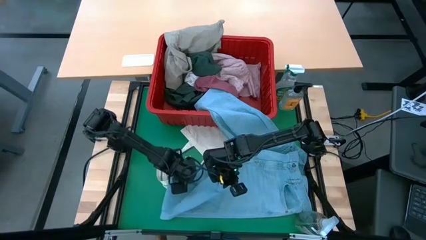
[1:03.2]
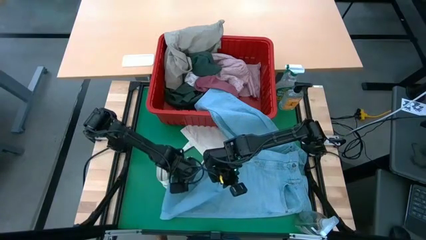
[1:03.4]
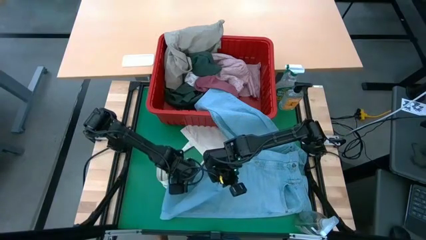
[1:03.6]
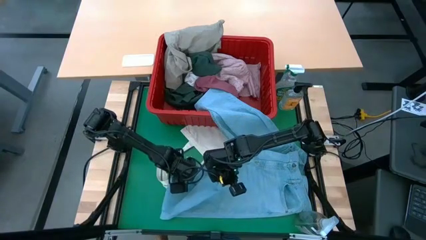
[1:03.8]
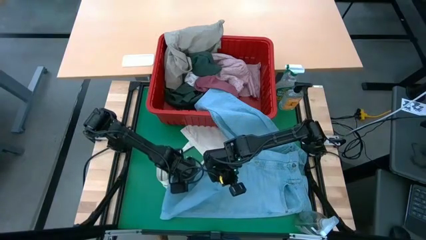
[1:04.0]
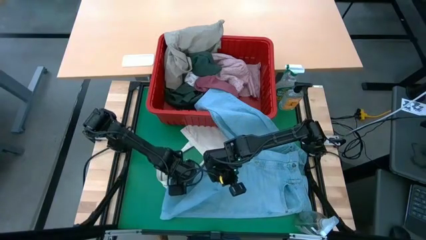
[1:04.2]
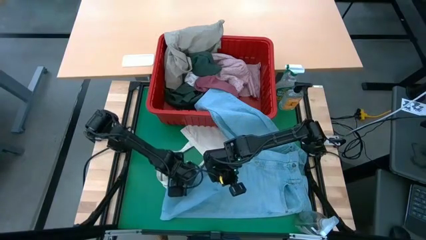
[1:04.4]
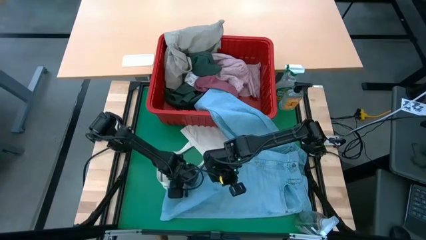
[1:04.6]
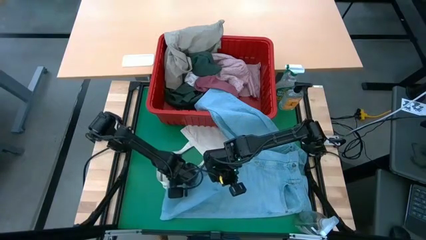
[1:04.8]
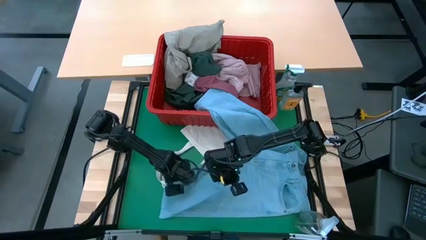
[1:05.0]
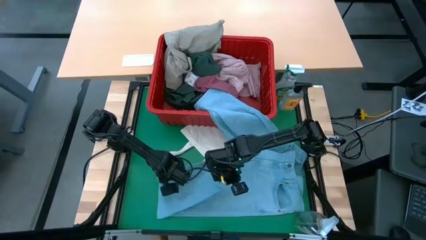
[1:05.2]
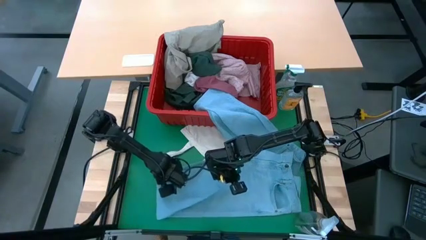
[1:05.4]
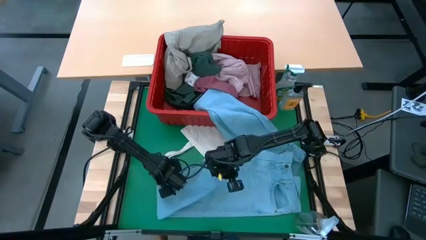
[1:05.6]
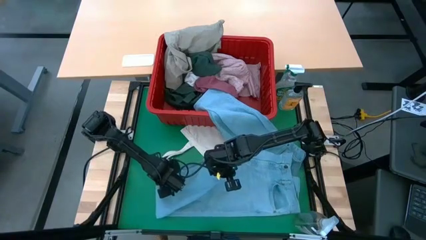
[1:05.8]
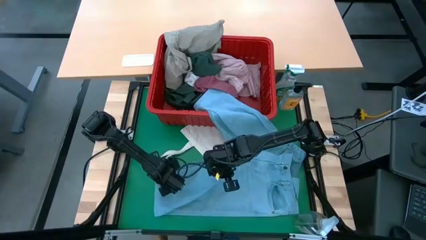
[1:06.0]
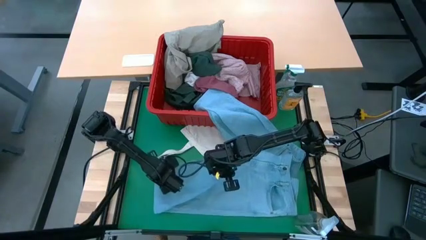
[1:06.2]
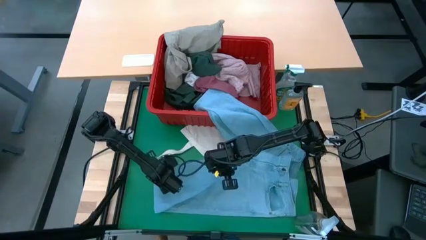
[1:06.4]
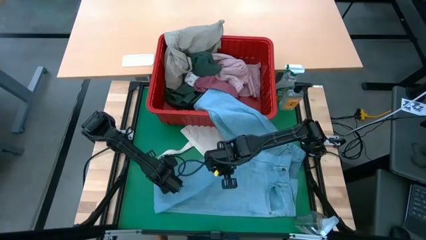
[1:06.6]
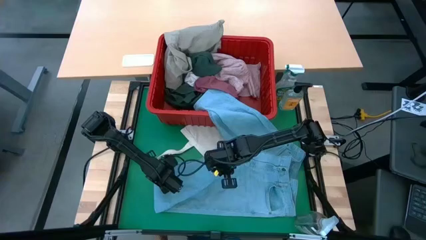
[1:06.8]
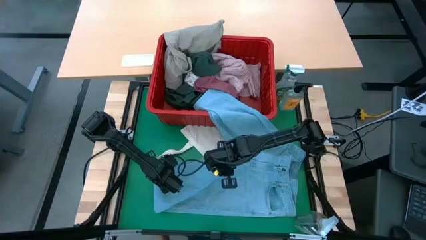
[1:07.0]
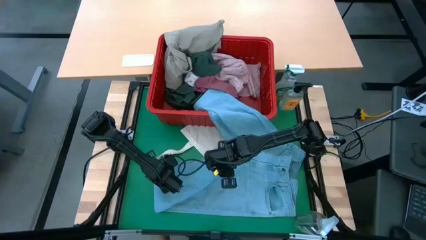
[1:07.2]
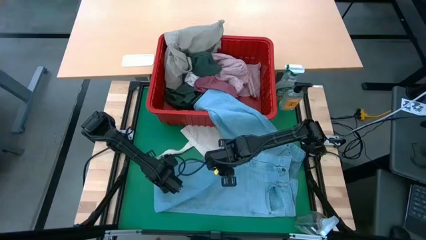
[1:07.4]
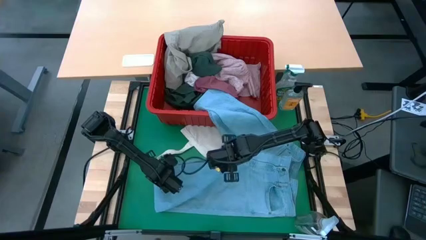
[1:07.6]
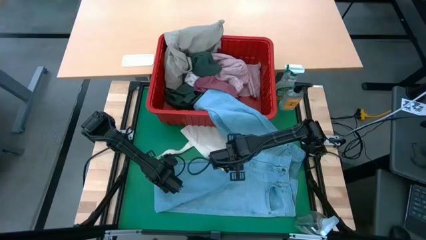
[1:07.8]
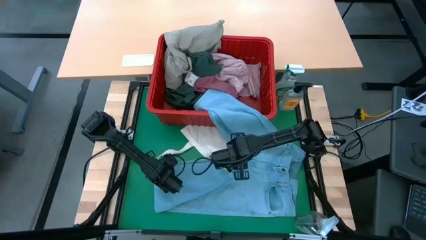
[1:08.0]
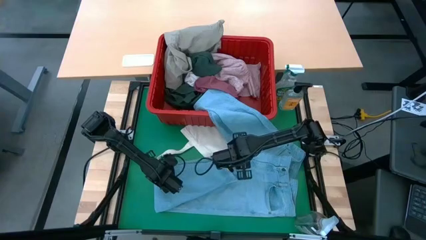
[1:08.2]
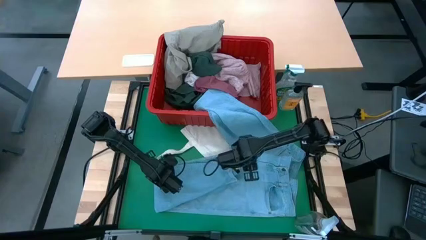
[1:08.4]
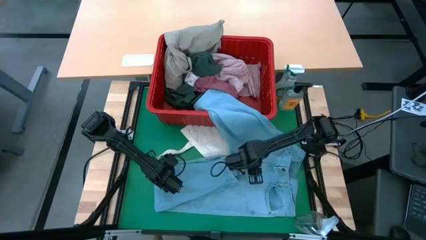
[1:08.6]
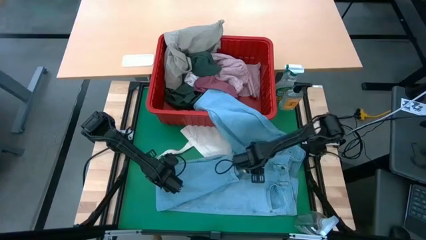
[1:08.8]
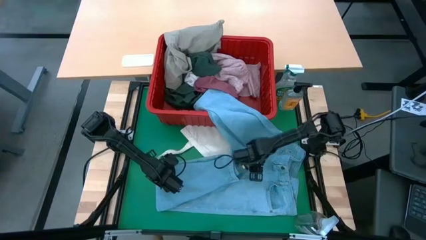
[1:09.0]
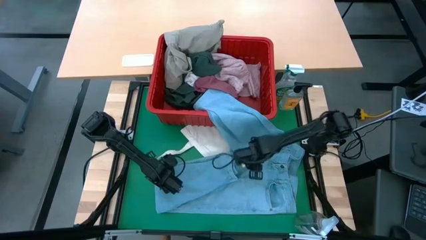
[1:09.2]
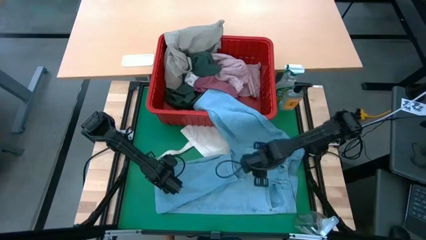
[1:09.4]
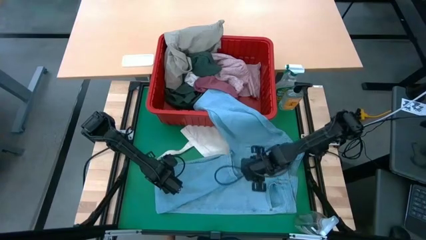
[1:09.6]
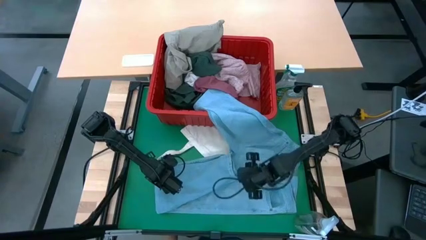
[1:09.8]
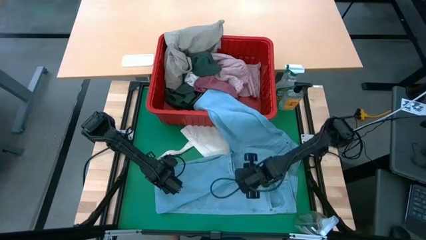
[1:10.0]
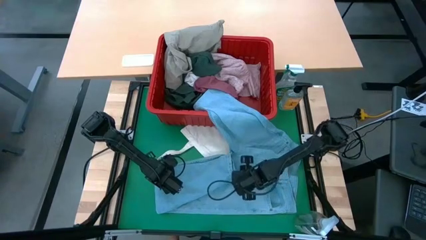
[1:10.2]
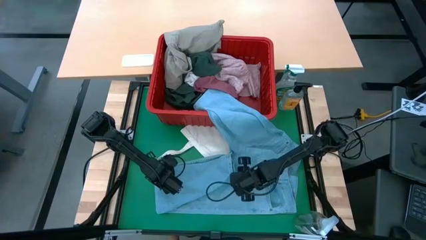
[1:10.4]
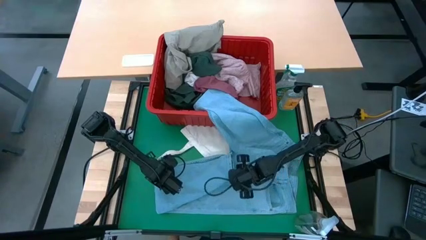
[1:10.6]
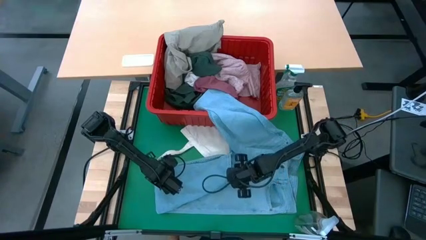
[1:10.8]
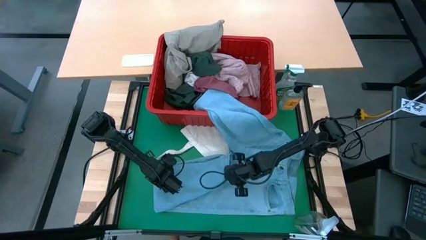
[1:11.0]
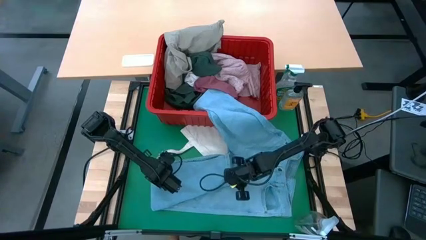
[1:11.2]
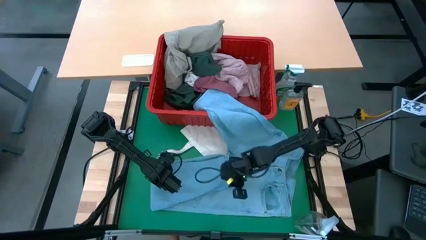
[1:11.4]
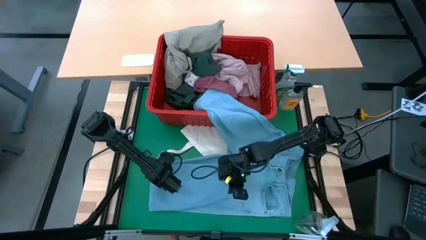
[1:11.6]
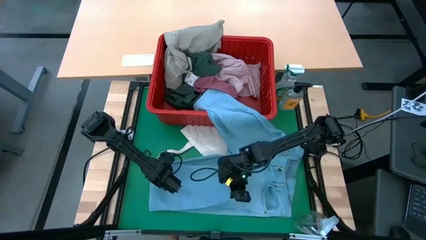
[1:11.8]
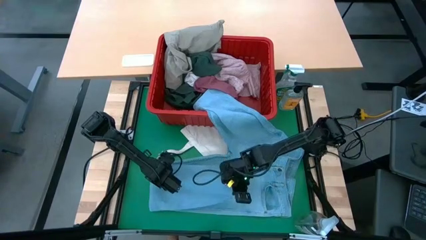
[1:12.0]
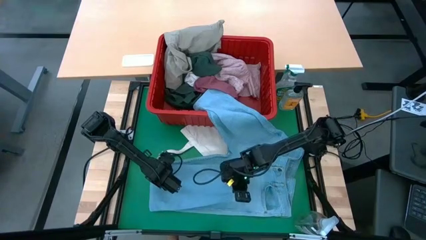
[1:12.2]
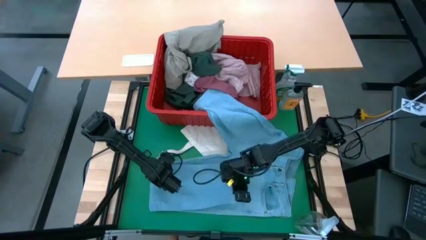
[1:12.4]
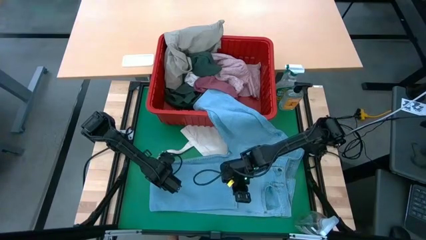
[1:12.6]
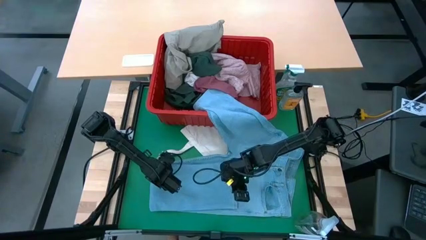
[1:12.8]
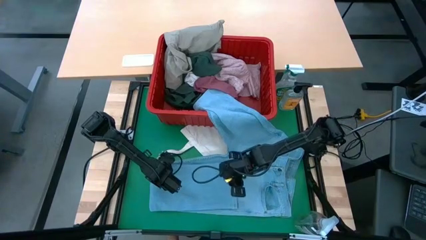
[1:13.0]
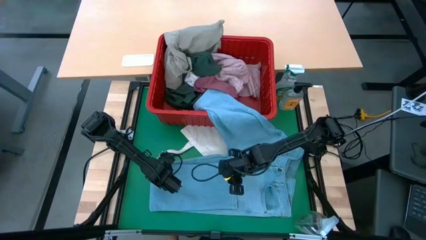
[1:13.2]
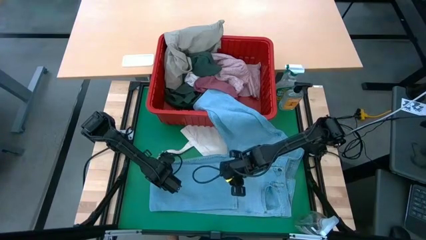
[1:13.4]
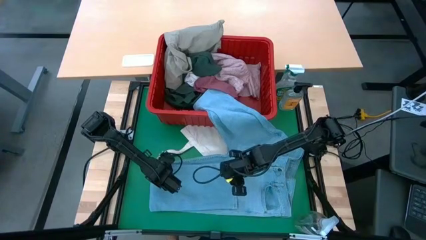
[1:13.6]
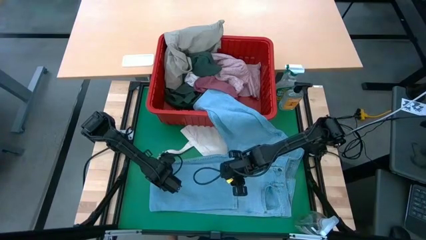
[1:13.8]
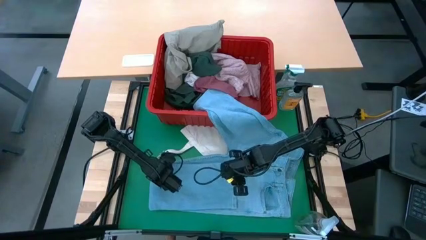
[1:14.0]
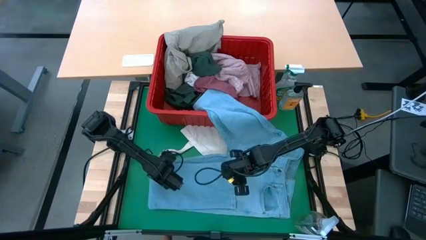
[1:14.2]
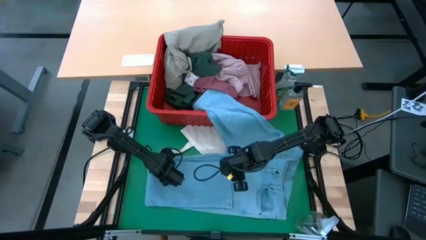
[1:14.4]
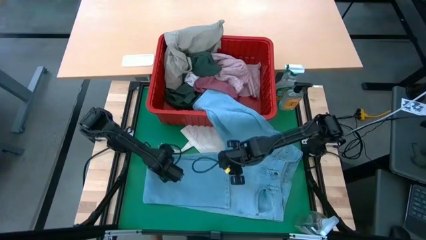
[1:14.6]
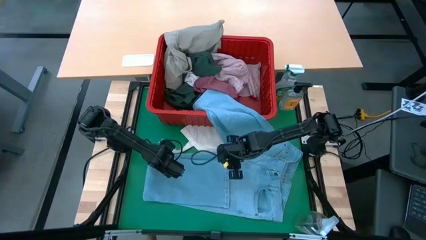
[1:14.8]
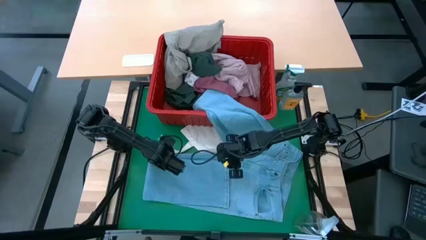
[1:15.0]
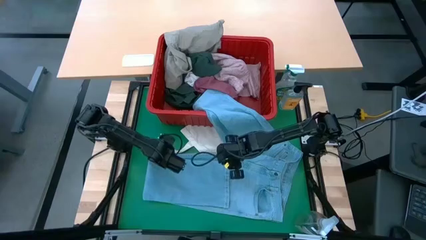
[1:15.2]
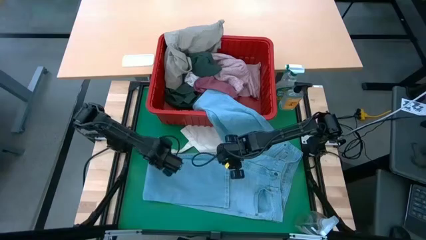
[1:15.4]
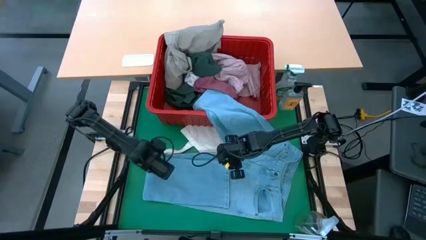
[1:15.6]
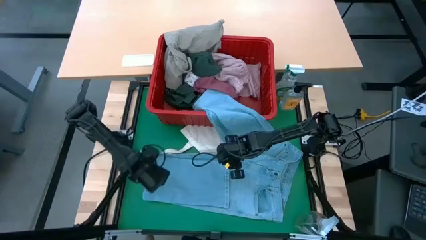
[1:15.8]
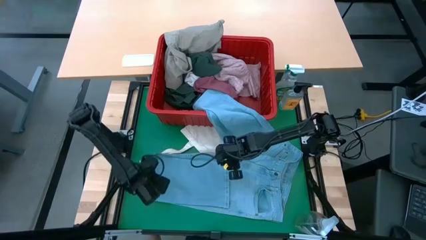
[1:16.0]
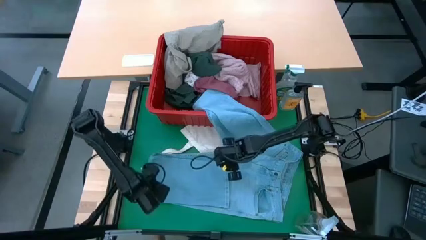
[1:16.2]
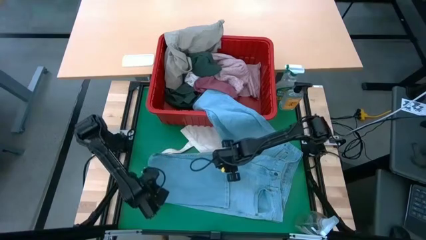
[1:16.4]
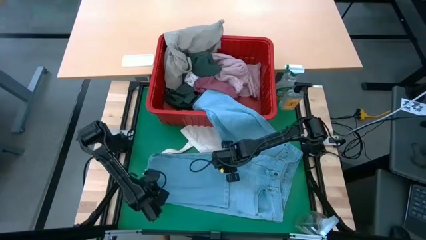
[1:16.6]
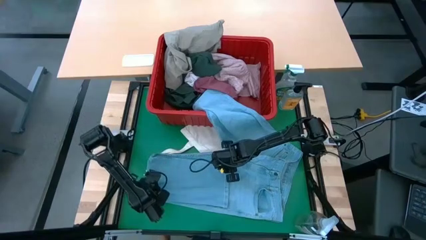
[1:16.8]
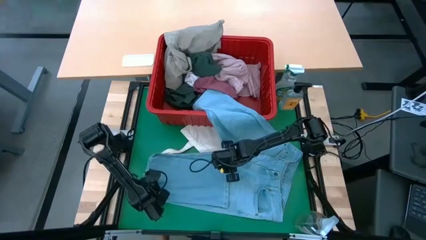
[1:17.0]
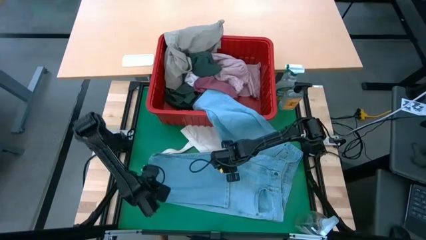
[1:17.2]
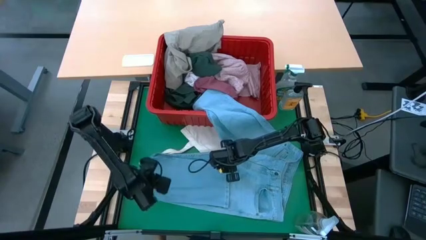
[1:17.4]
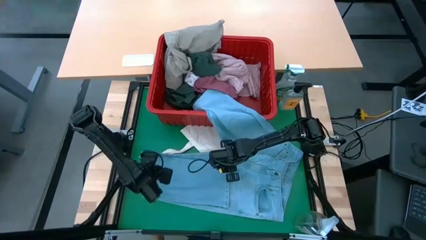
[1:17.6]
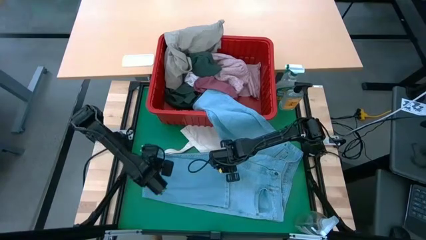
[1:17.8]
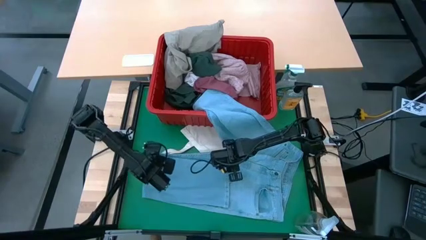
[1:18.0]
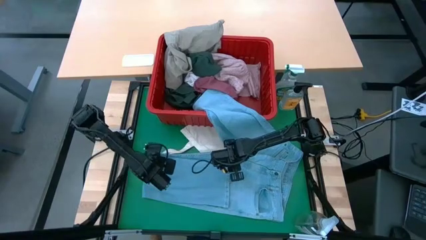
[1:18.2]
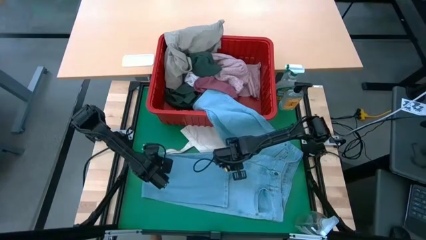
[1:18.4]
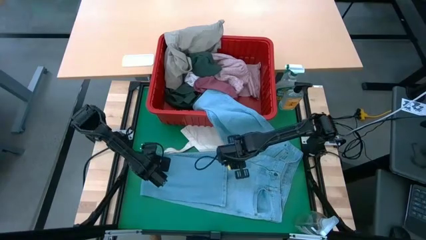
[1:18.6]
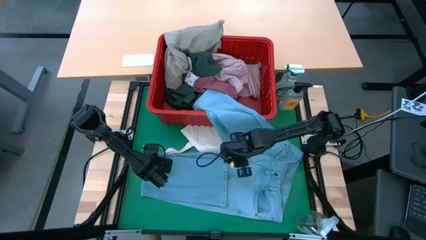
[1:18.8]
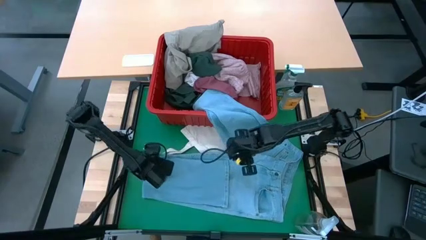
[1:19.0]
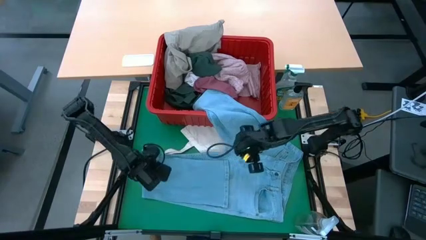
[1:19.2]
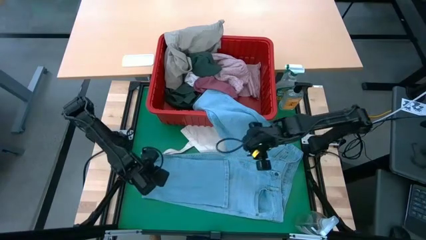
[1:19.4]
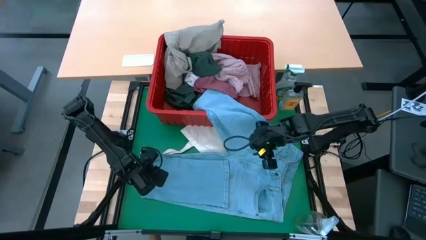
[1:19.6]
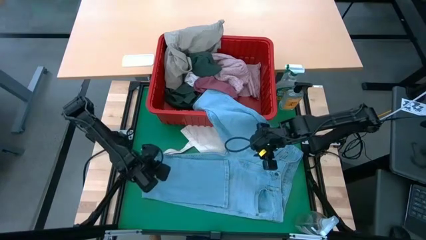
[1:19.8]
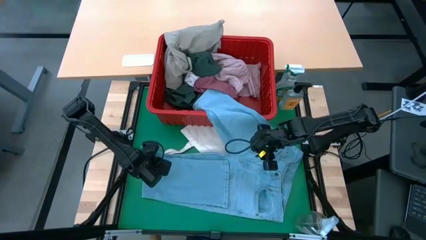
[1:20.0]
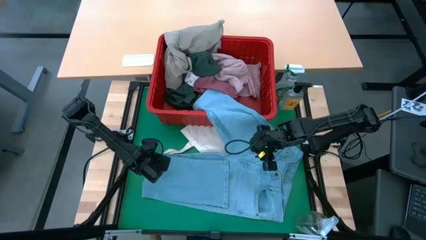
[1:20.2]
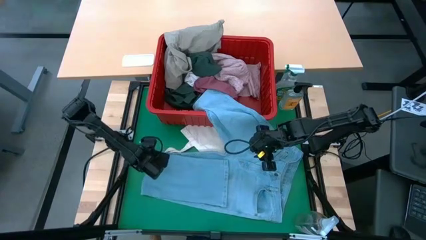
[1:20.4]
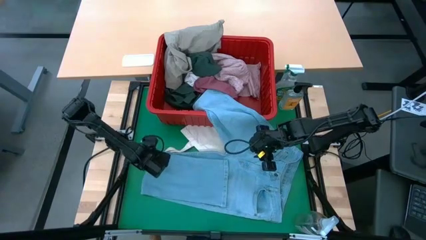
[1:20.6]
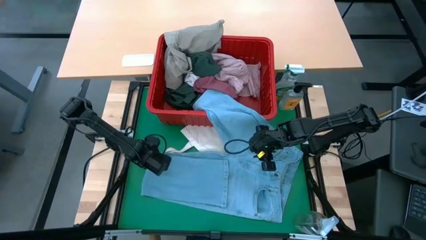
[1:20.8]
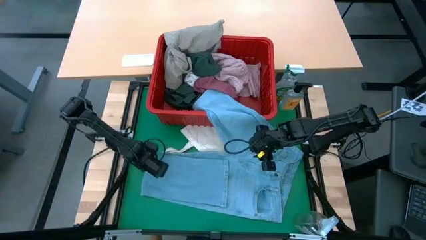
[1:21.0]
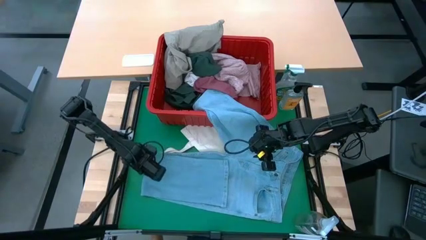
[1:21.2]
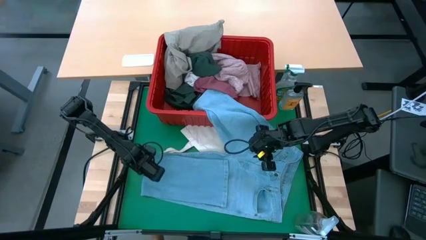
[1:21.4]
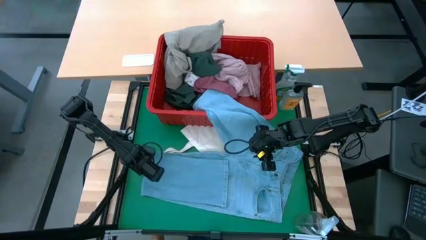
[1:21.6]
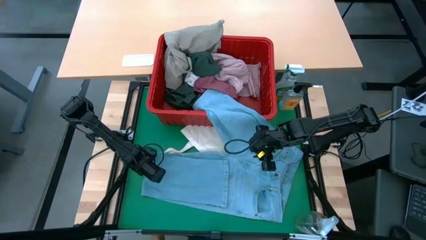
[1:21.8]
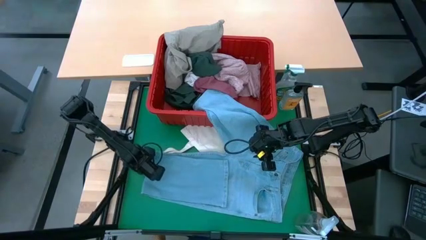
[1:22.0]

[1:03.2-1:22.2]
Task: Fold laundry
Fold the blue jeans
